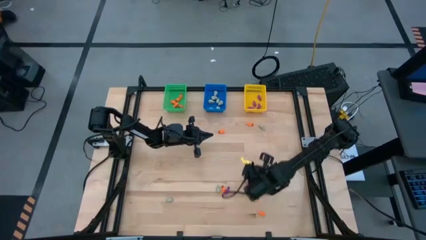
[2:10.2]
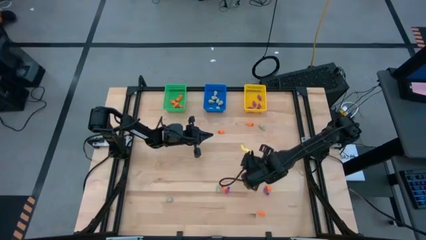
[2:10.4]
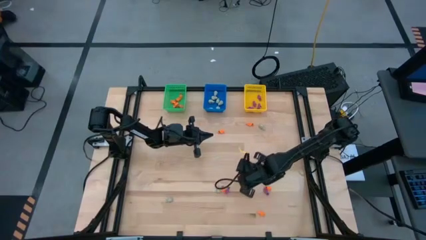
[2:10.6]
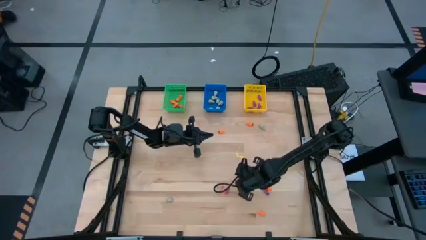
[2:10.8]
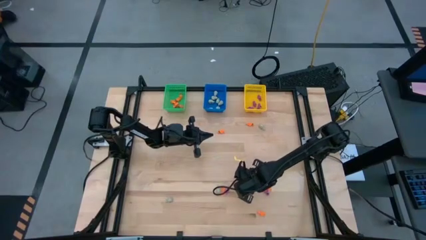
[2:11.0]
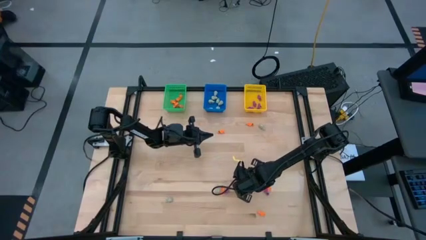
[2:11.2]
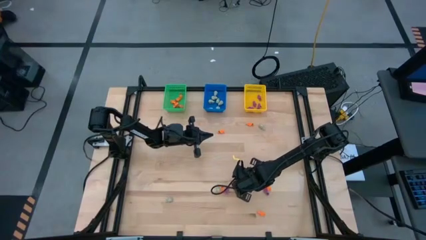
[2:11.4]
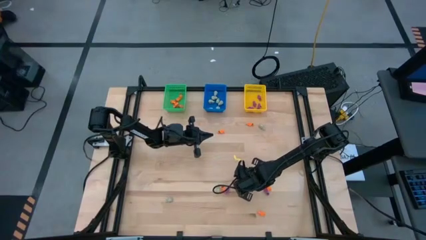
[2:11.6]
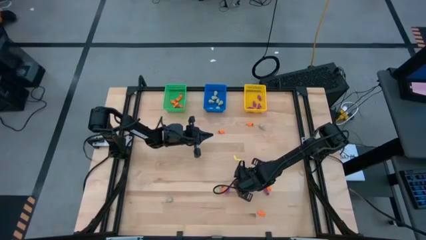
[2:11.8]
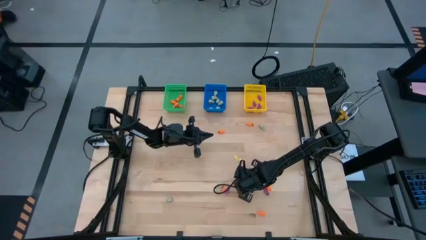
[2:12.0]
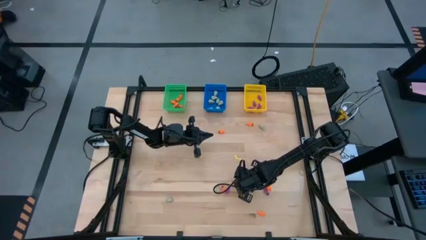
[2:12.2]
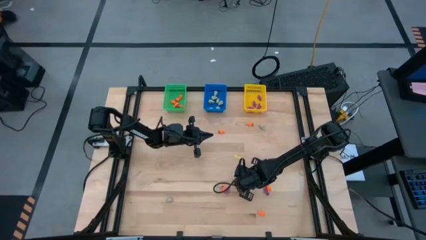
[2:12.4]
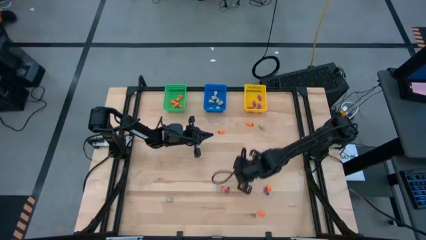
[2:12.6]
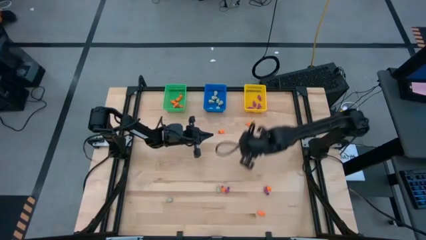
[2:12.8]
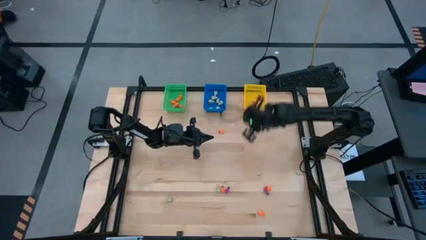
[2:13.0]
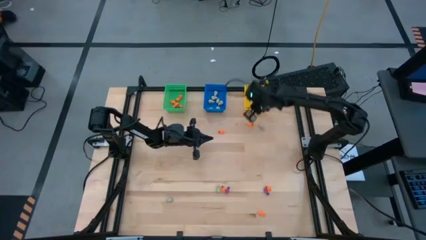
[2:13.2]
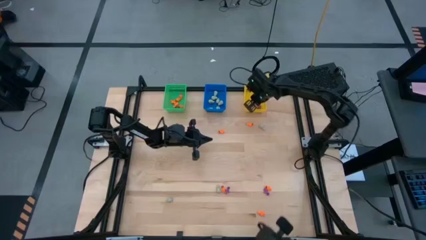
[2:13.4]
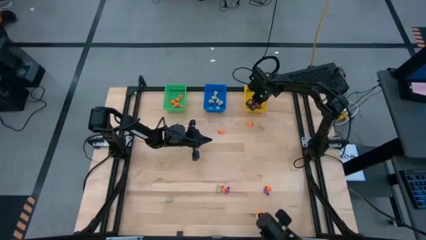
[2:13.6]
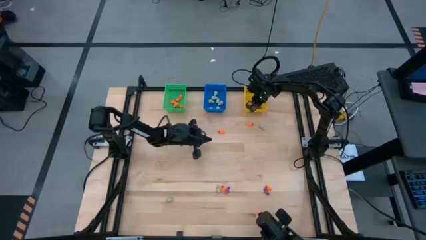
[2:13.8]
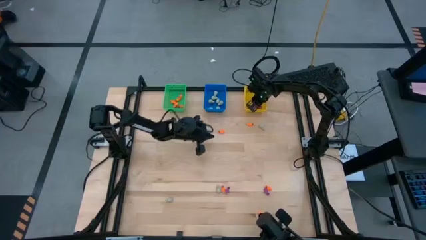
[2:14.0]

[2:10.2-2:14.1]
Task: Sort Halloween decoration
Put the purple skeleton toy into the yellow bin

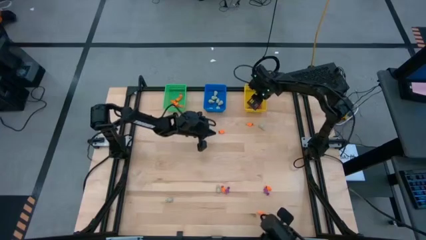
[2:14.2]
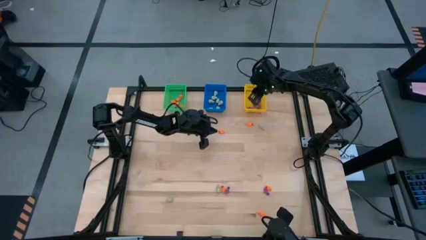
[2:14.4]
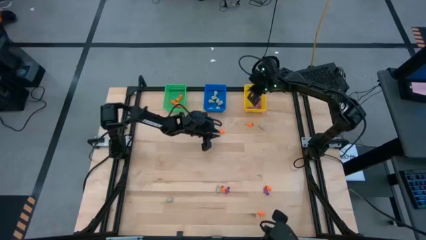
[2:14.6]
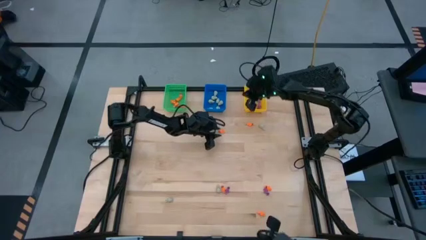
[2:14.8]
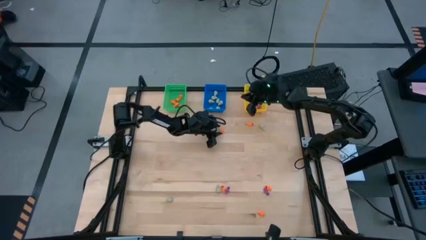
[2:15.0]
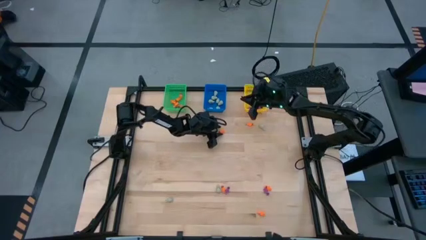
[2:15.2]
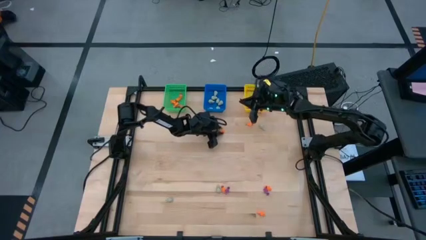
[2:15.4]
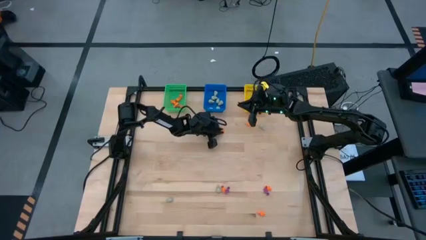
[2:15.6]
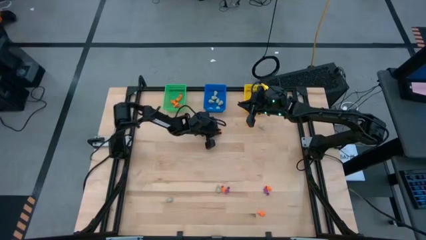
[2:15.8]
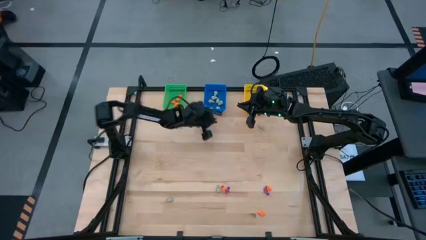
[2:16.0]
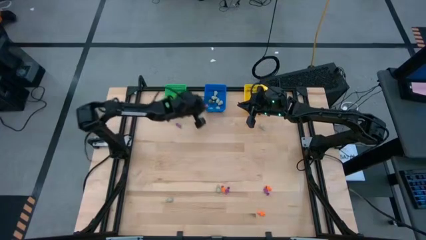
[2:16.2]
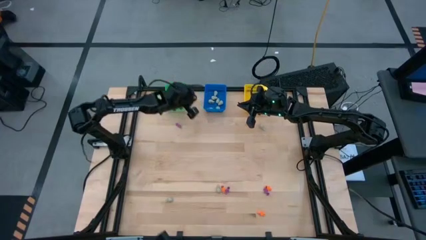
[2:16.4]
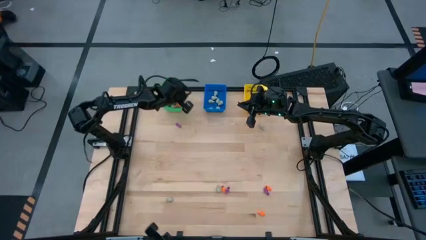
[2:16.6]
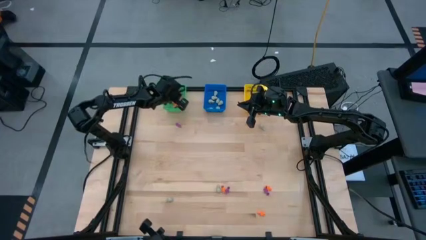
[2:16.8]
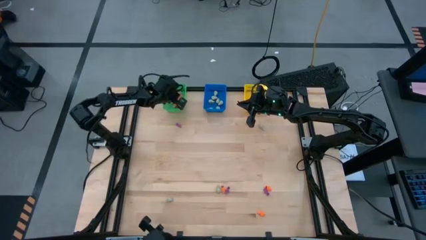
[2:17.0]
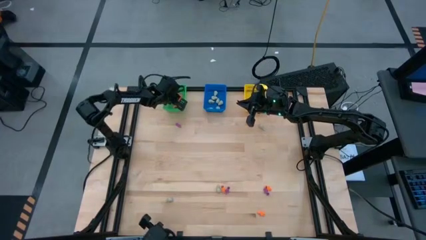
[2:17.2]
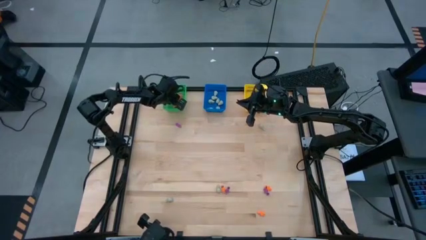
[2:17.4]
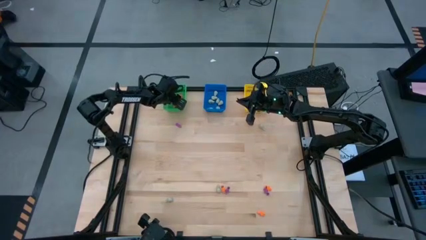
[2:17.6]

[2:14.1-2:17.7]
Put the orange skeleton toy into the green bin

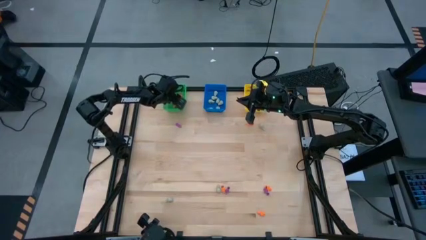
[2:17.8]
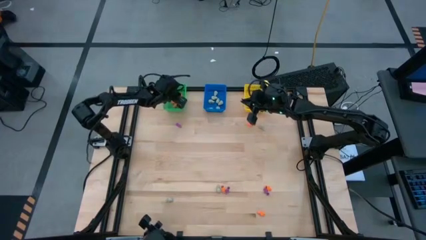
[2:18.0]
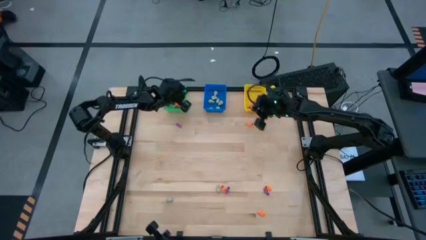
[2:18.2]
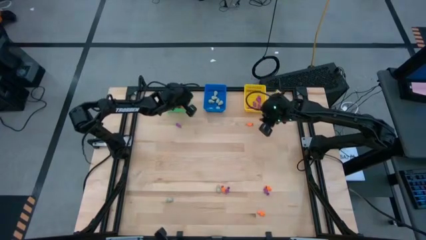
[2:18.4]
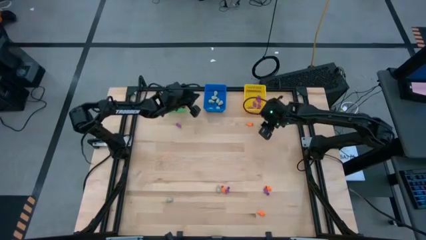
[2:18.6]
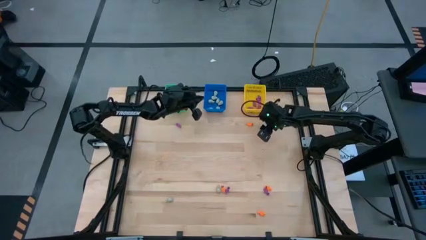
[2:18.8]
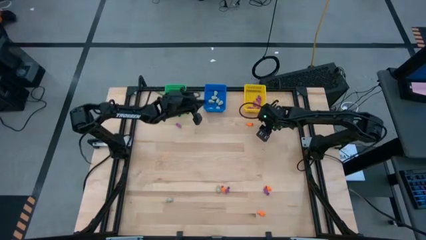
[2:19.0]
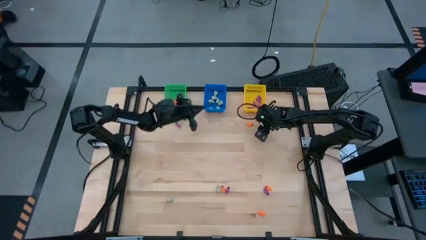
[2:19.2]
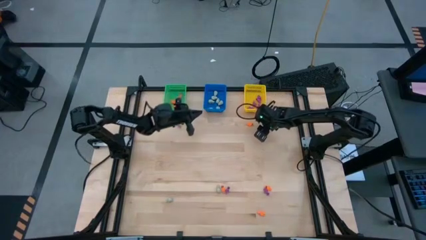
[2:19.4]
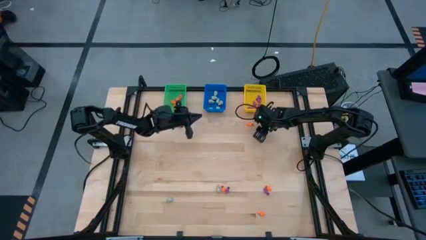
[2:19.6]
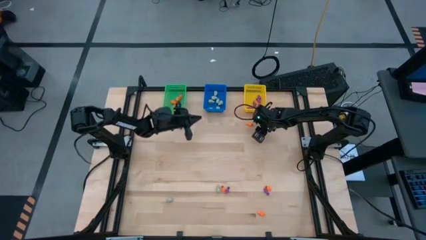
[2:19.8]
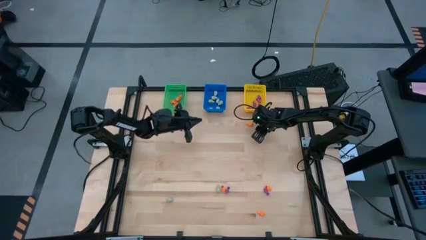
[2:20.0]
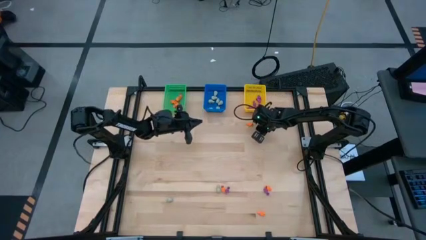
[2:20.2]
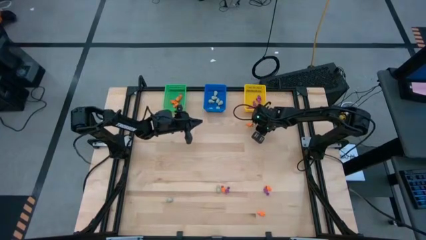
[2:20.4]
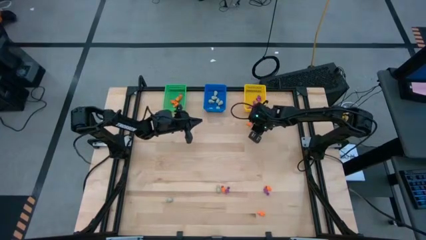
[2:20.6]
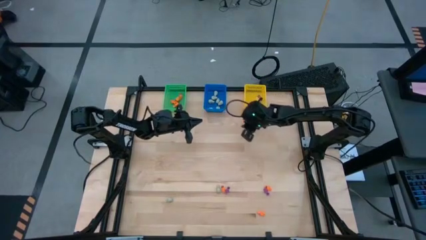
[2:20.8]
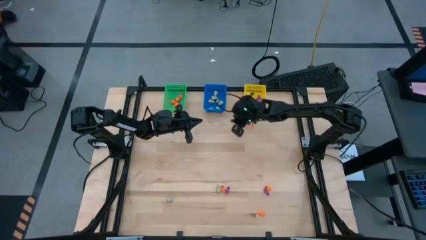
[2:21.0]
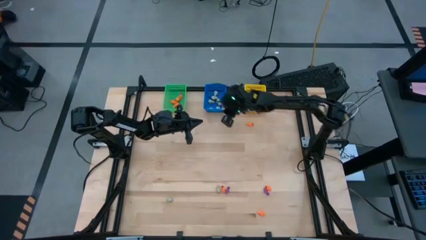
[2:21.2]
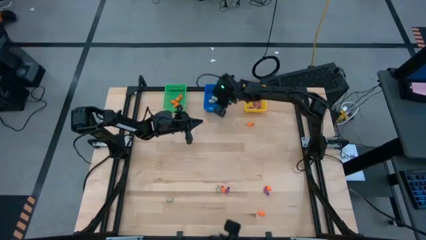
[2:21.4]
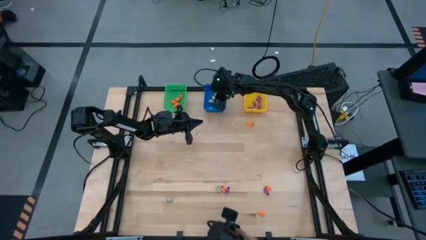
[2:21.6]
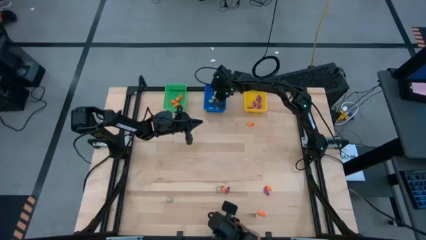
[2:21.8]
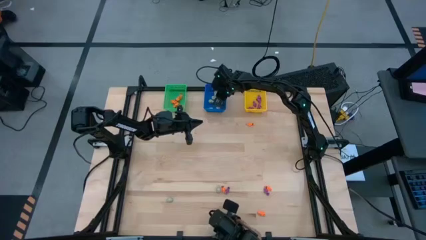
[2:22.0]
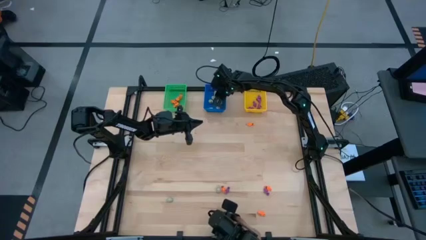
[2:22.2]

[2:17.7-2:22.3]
Put the white skull toy into the blue bin

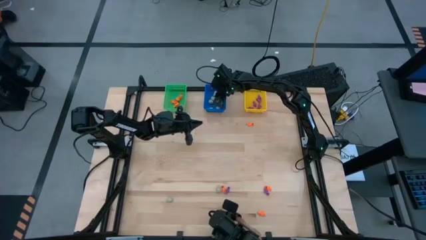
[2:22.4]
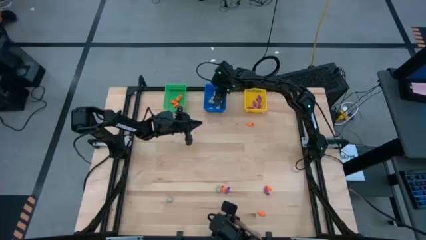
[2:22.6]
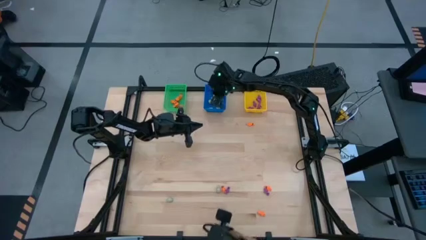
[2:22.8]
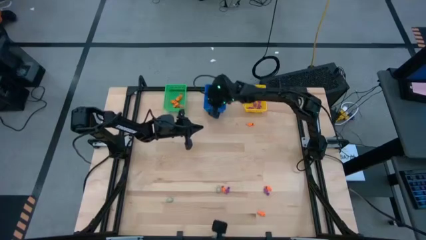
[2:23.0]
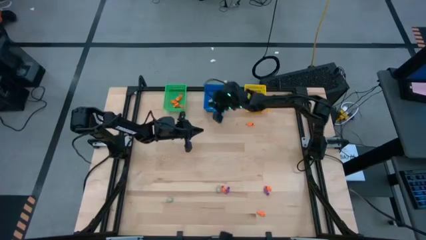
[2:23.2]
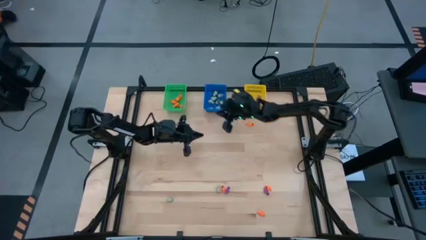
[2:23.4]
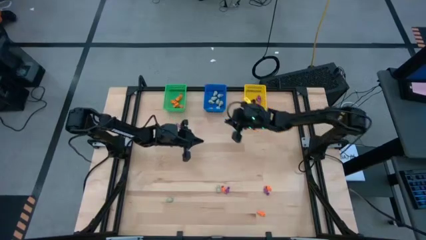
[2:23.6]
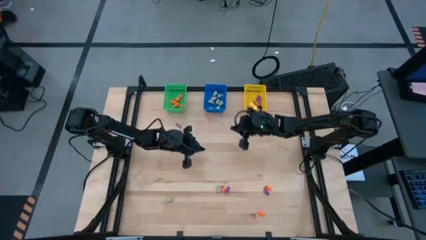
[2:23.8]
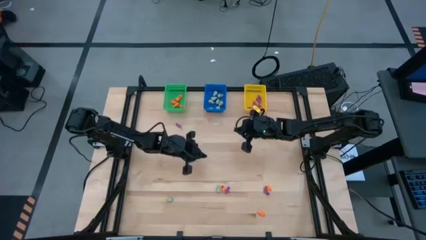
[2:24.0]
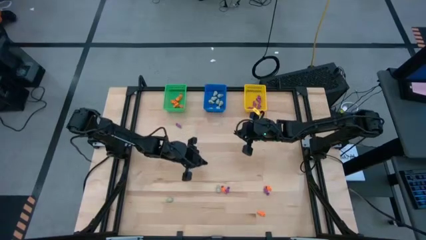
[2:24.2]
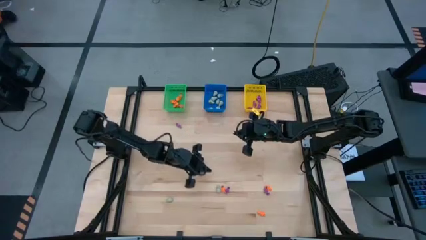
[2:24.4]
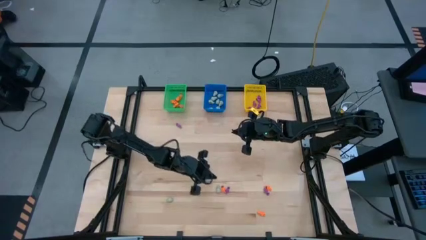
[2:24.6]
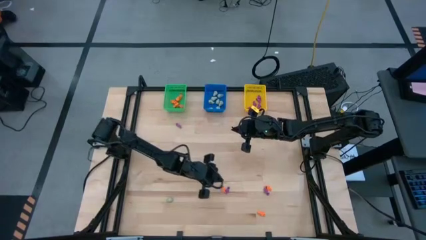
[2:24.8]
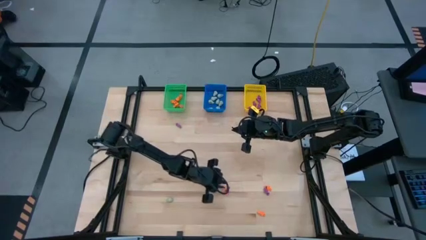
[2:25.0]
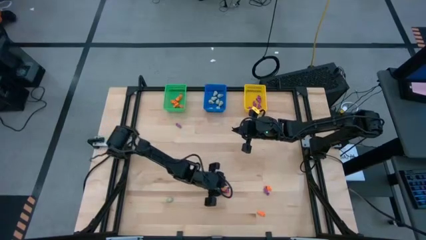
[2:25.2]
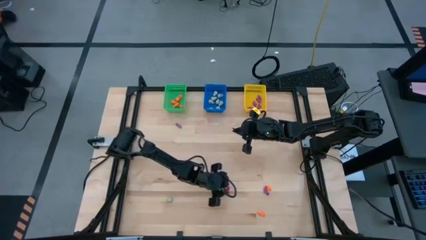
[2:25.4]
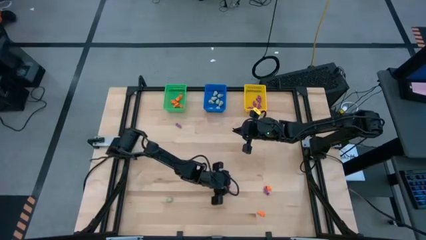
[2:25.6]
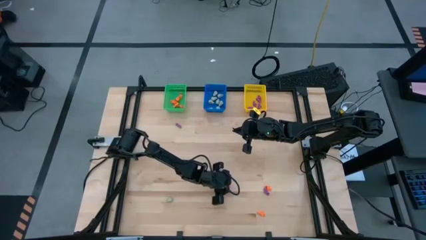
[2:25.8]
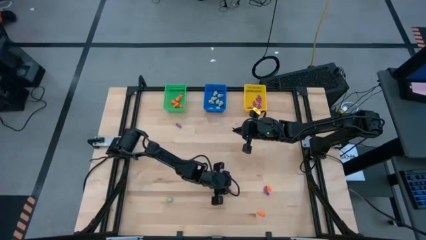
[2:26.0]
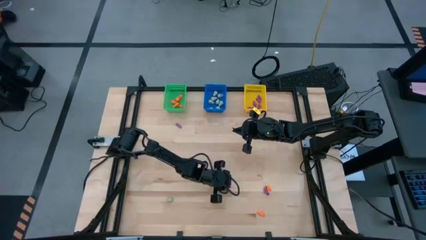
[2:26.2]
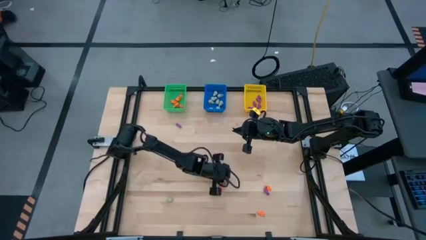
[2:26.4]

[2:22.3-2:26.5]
Put the purple skeleton toy into the yellow bin
